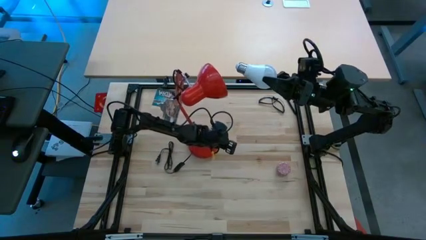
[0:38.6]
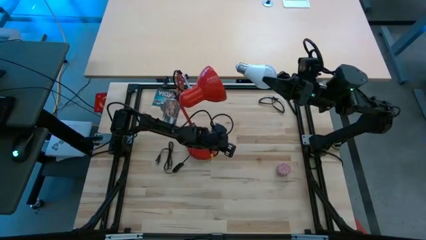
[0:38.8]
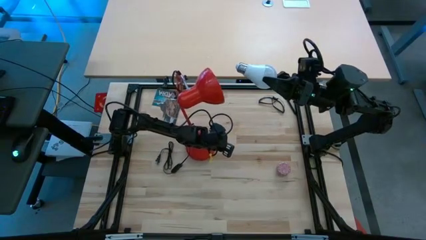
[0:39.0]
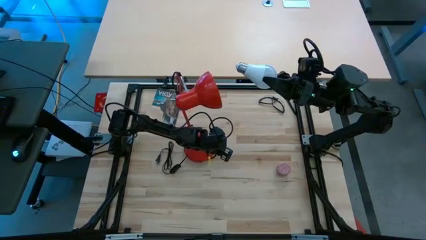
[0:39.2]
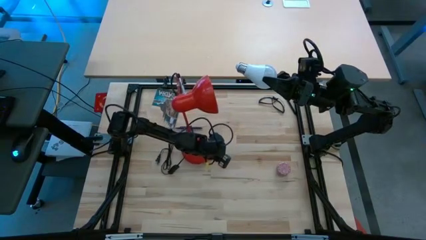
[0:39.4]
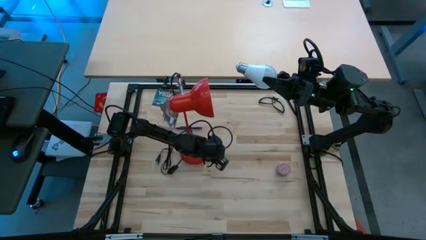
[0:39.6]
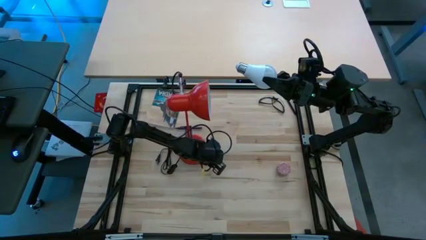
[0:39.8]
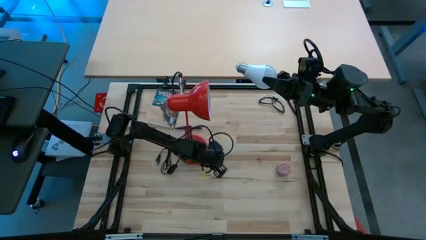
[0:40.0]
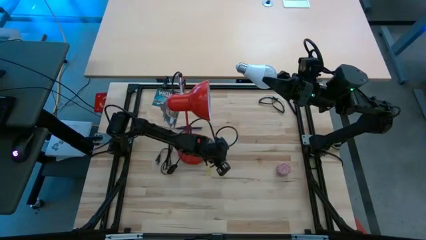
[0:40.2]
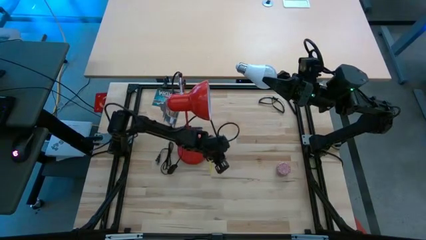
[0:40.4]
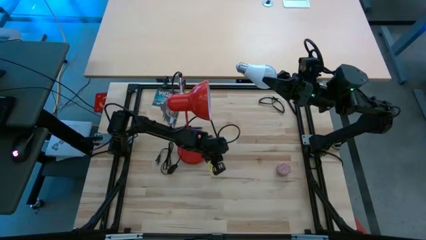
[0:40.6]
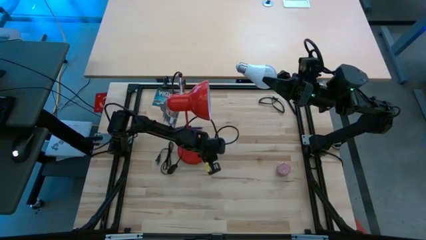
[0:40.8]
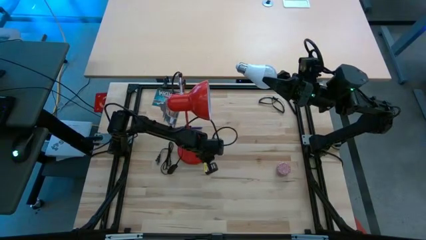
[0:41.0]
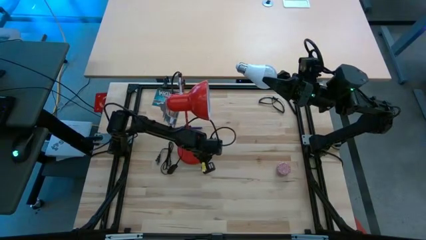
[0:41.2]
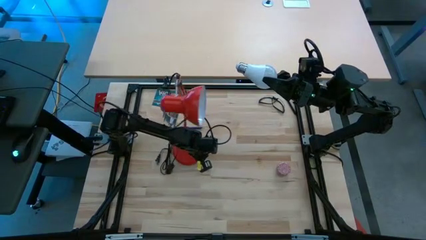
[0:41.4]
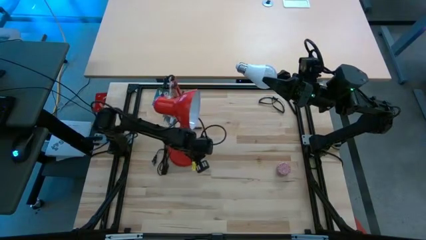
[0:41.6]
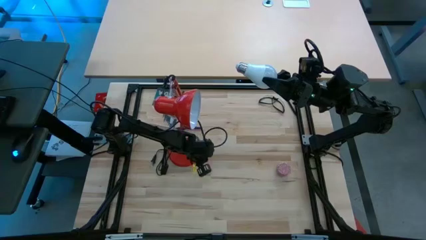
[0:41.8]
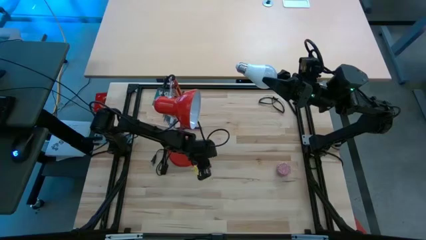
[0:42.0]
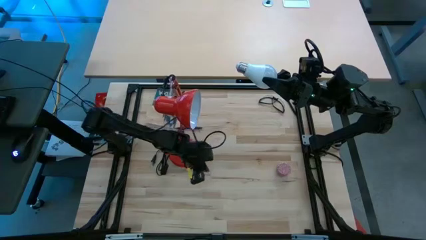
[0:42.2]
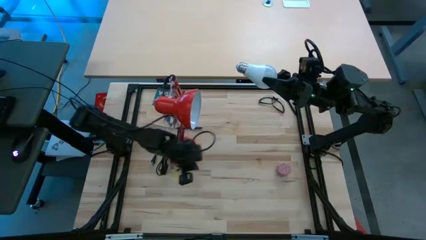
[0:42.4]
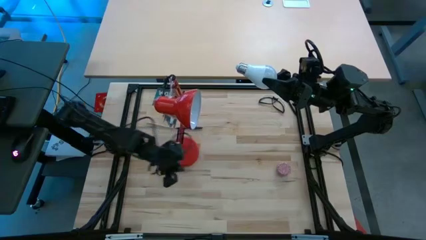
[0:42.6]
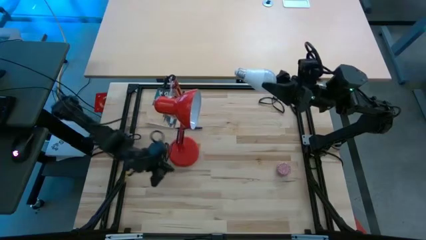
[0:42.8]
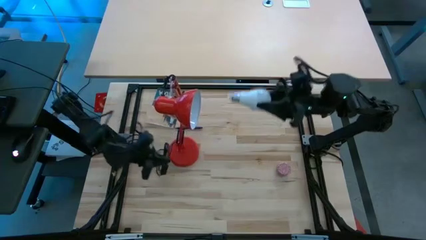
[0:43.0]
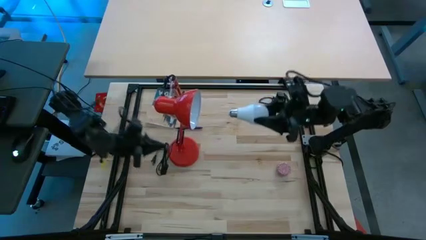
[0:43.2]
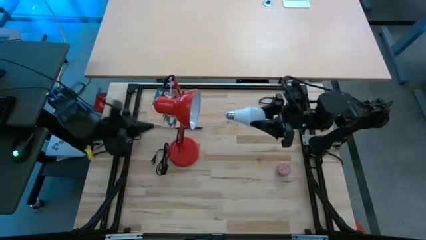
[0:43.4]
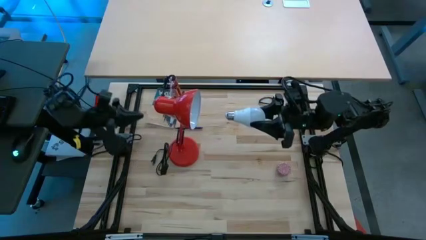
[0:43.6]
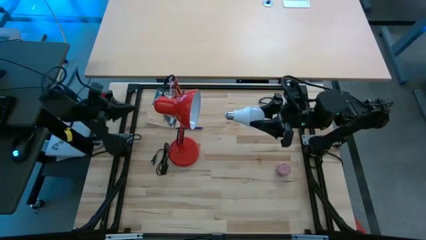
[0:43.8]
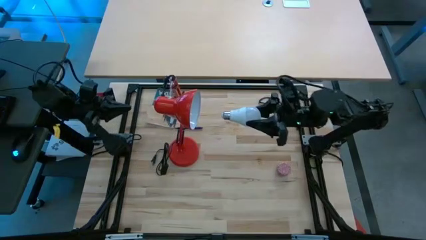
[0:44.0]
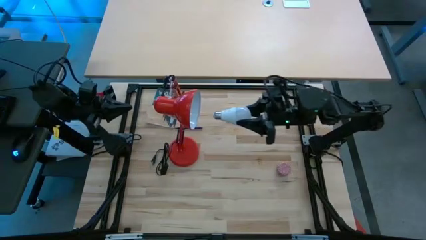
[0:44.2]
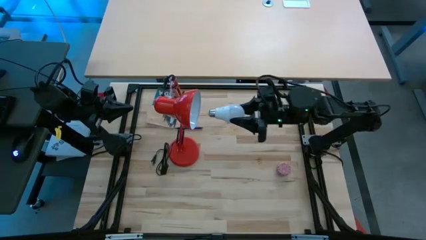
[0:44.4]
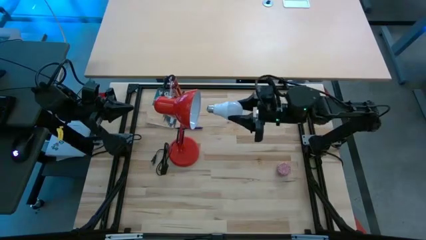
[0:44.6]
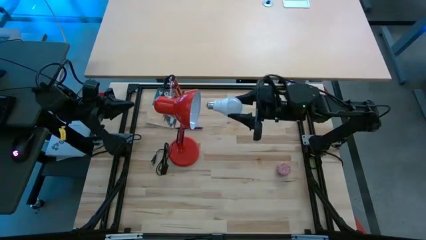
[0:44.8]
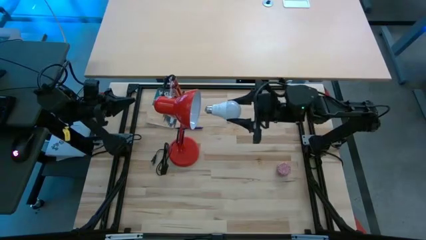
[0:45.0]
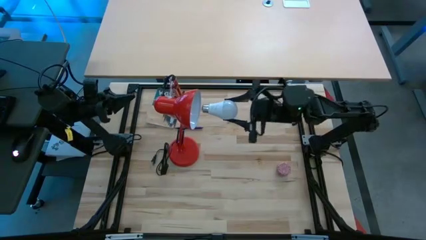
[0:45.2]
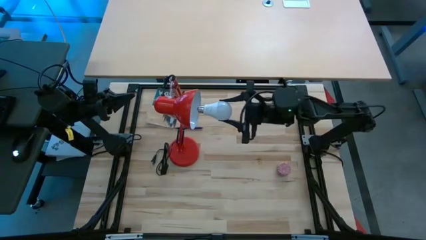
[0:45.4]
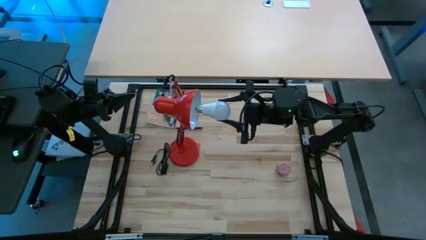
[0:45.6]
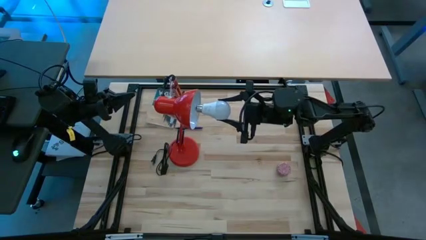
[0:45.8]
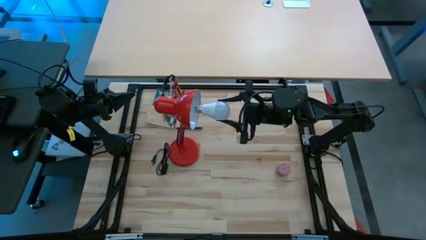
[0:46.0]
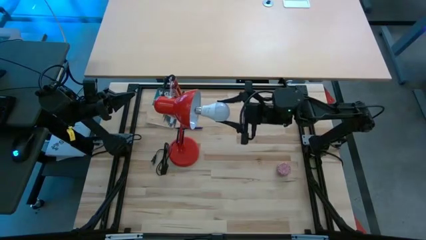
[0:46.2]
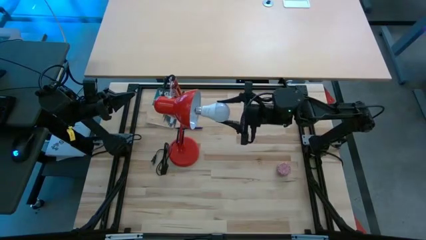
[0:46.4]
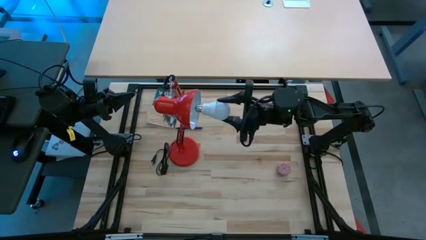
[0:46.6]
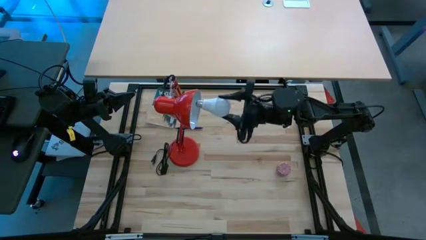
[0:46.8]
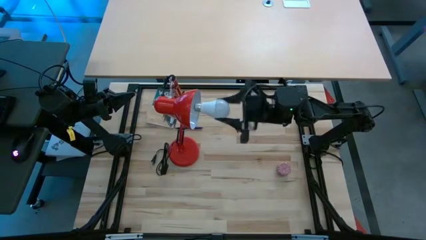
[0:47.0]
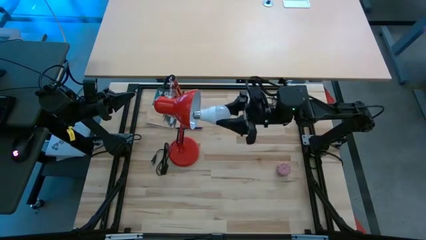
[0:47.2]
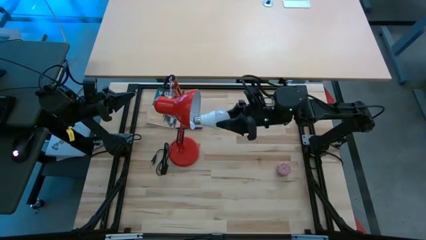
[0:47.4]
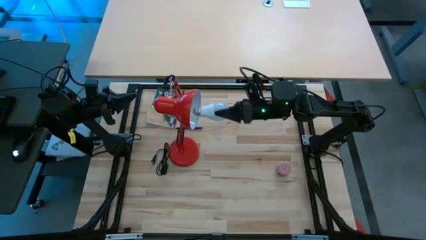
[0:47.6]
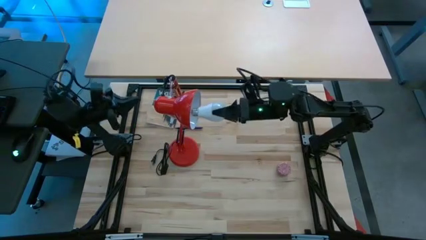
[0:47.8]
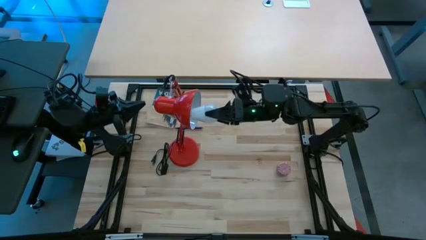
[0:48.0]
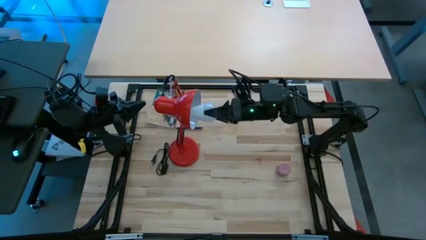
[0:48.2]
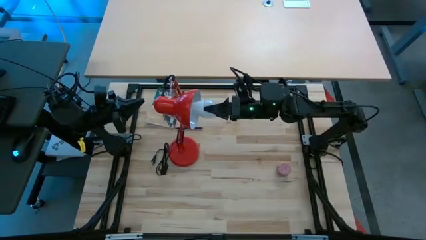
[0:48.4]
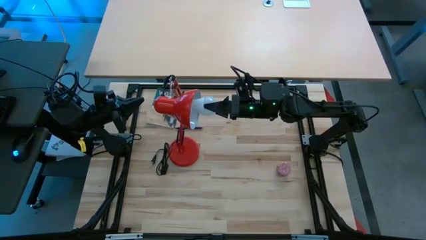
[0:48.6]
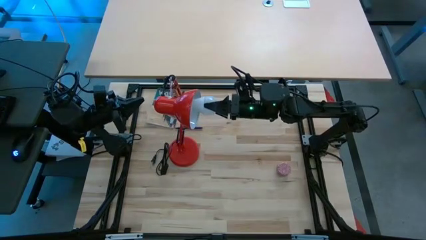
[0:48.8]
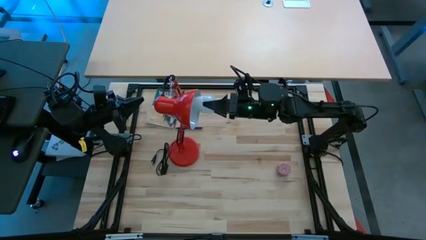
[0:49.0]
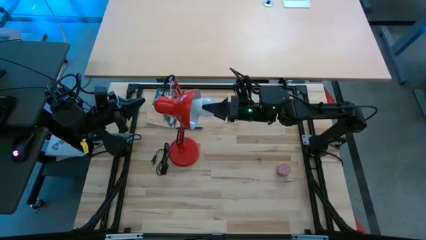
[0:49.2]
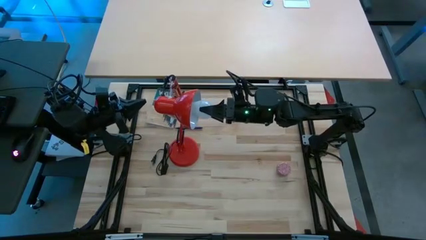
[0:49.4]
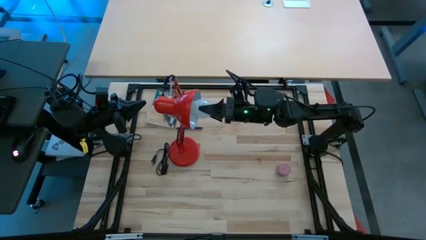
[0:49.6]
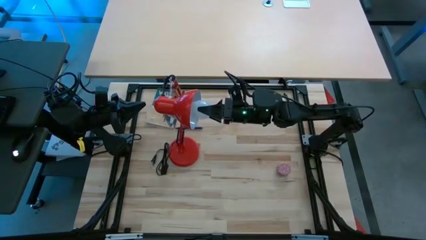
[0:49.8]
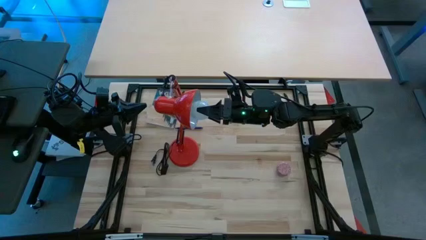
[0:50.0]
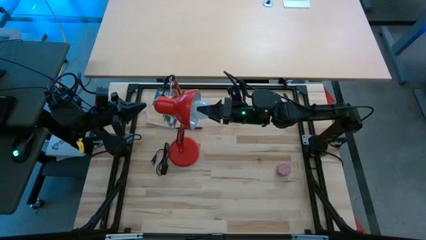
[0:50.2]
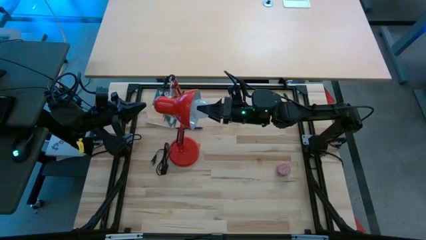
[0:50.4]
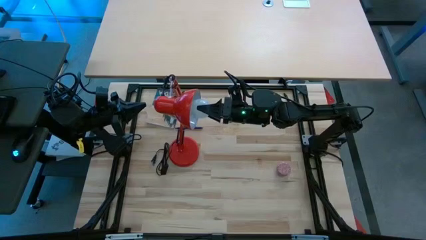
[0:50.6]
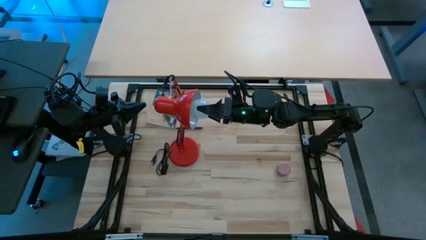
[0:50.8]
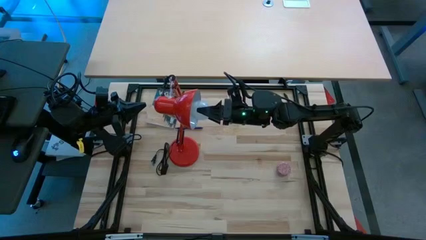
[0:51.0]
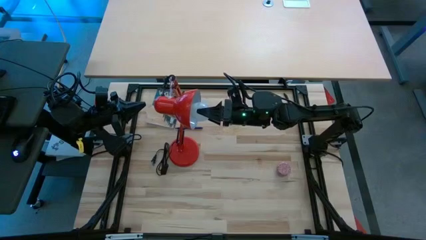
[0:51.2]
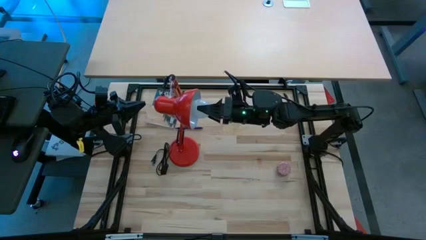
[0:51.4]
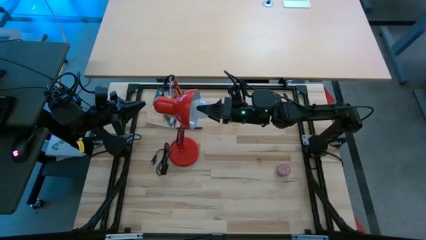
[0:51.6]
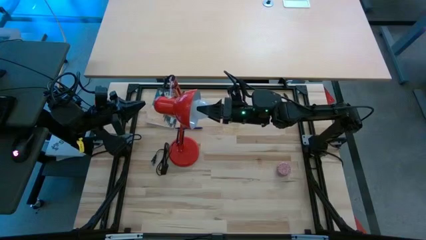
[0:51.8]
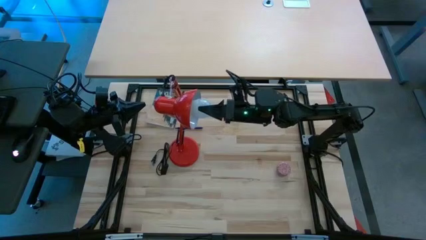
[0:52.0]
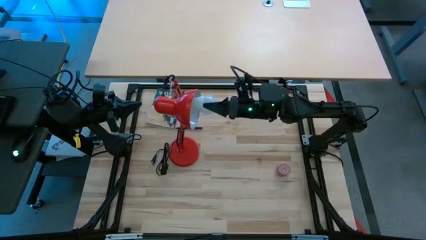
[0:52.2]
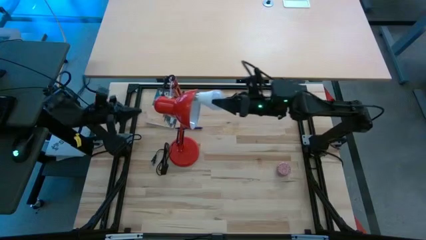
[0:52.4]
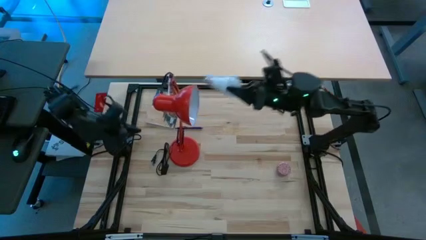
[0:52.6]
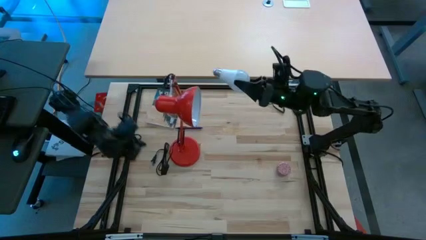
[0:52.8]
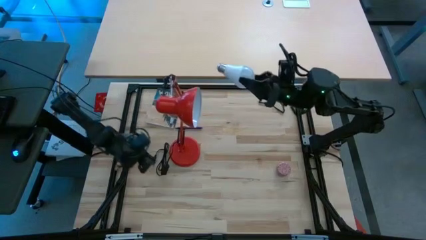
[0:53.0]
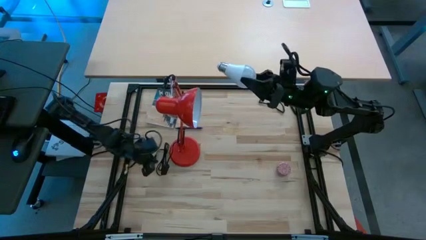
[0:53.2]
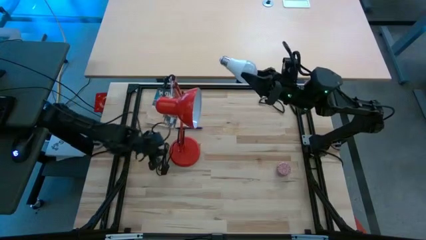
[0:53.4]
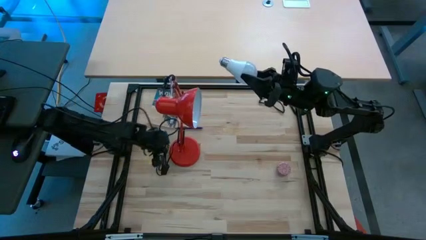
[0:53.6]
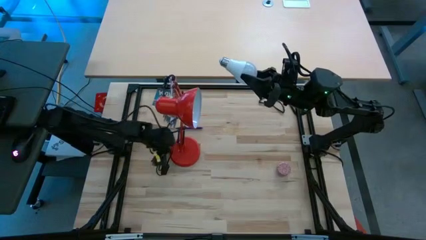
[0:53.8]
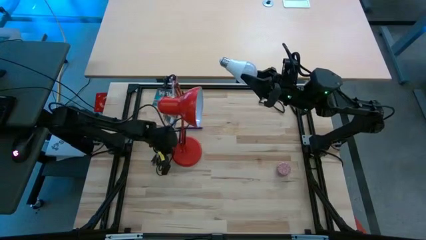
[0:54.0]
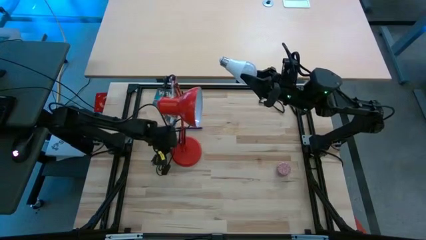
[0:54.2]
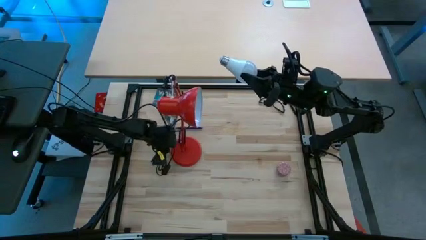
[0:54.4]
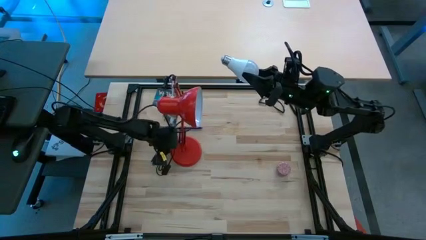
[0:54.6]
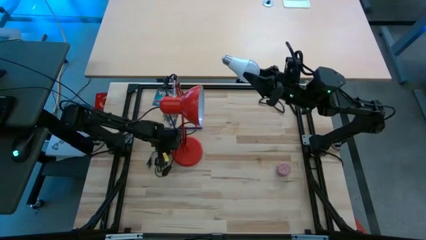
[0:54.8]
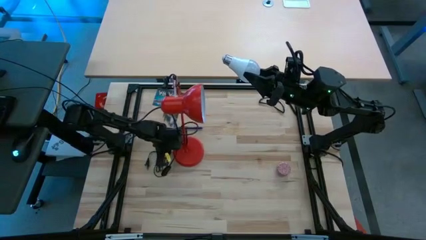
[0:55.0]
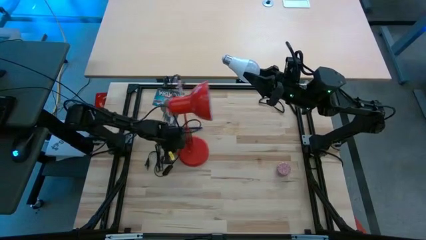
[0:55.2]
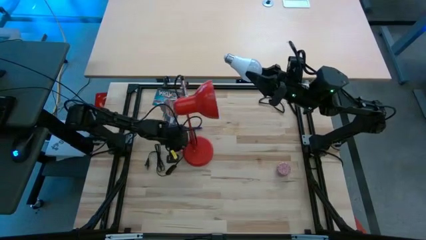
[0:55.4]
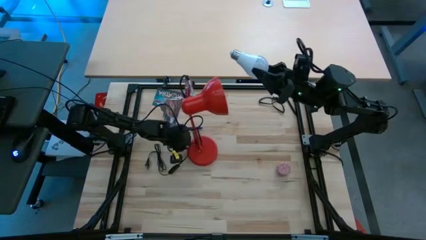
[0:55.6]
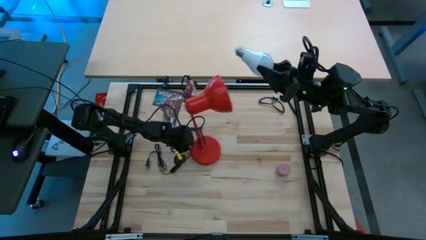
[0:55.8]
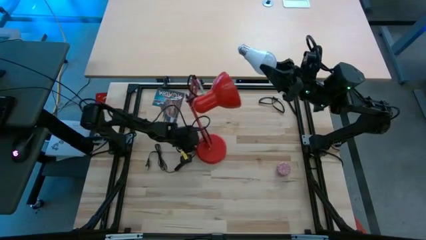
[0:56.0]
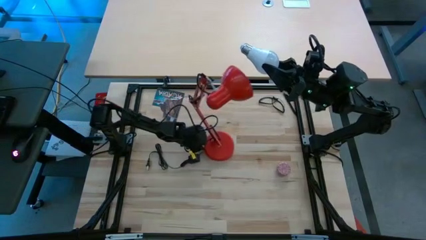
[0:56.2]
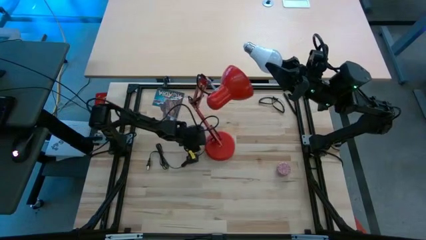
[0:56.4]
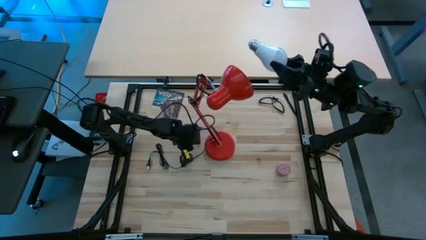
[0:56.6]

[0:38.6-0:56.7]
Task: Screw lightbulb
Insert the lightbulb on the lamp
